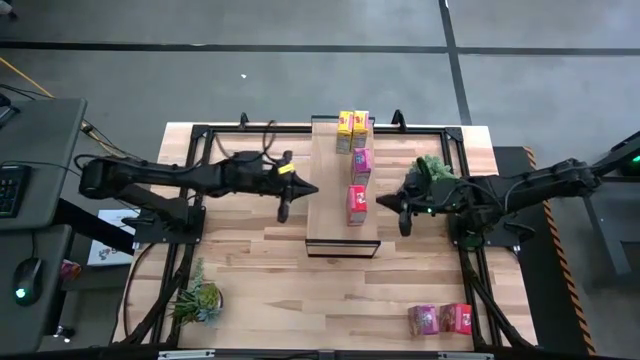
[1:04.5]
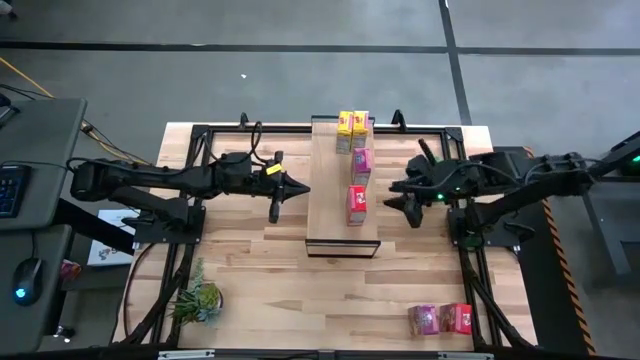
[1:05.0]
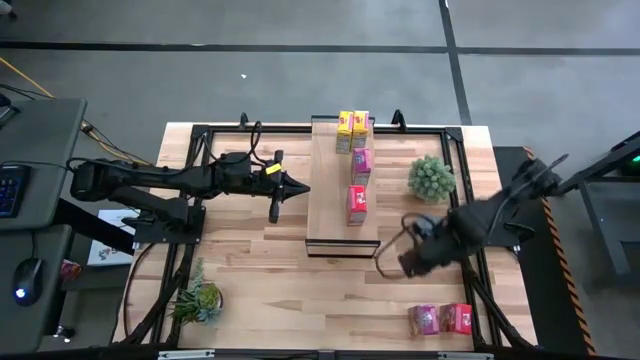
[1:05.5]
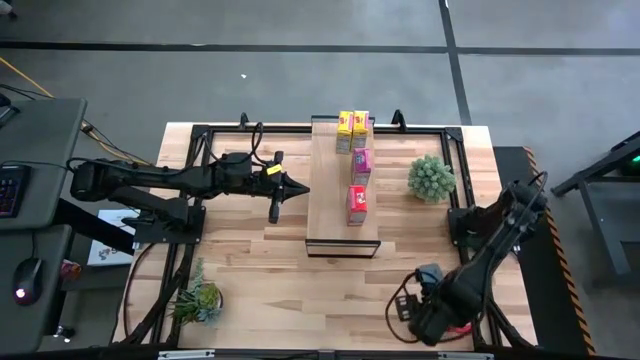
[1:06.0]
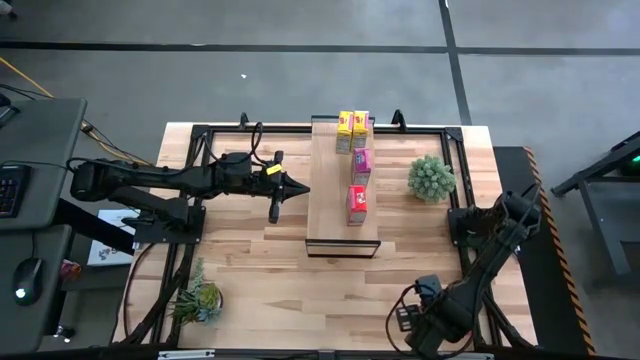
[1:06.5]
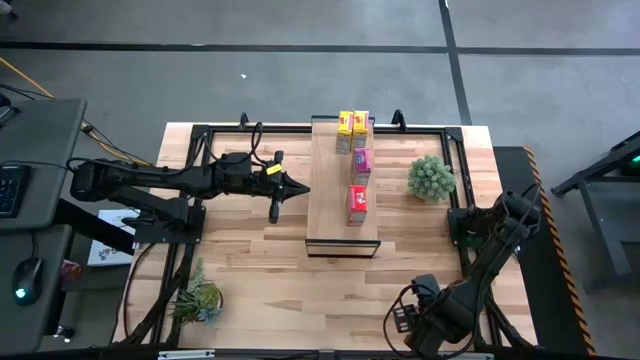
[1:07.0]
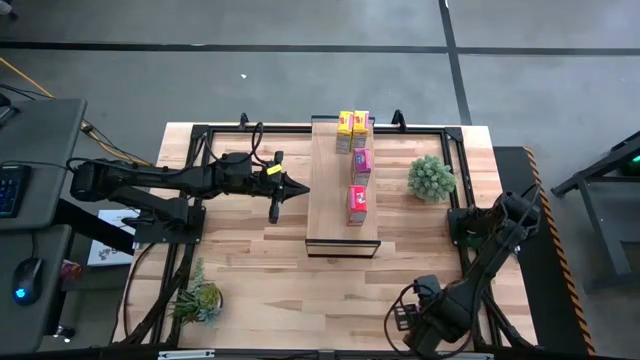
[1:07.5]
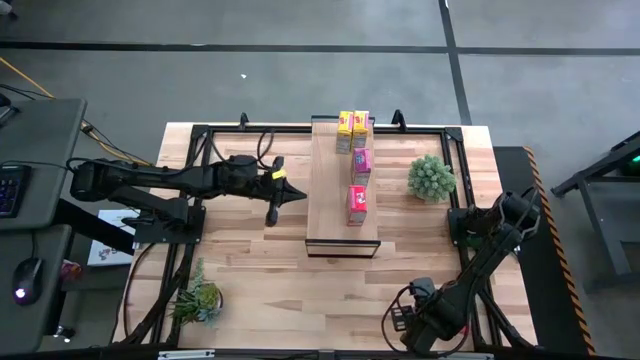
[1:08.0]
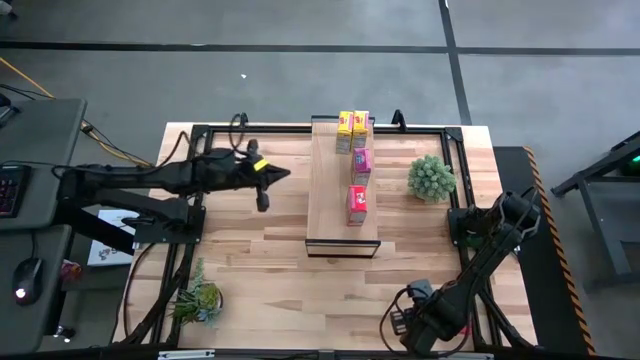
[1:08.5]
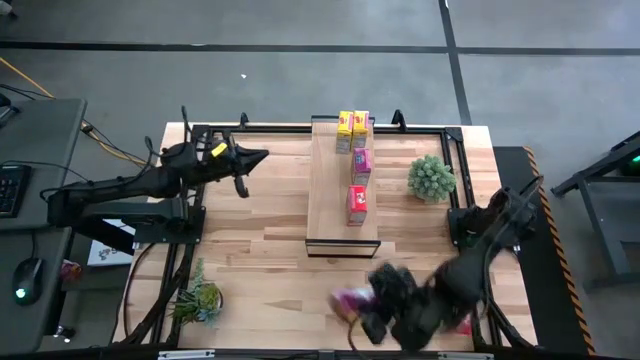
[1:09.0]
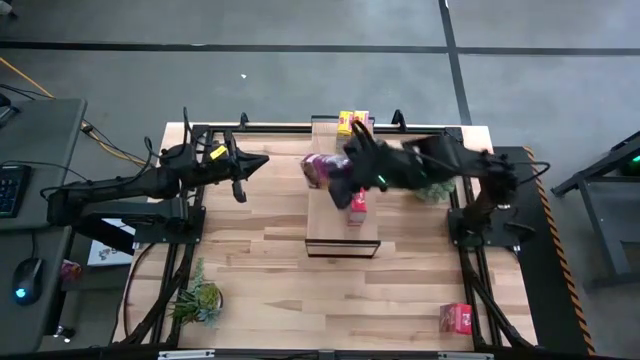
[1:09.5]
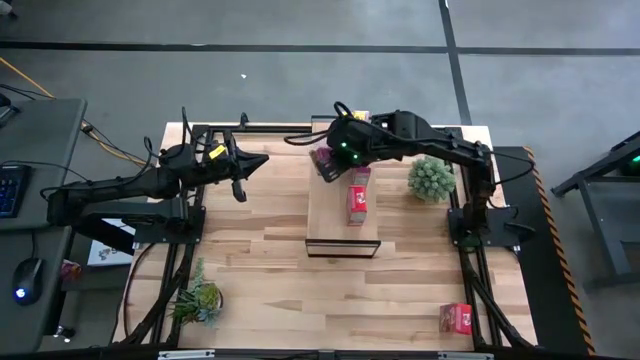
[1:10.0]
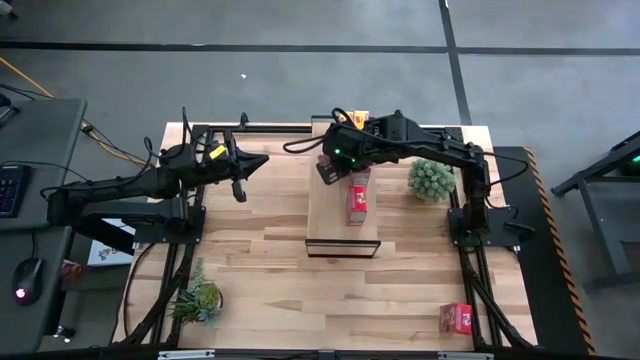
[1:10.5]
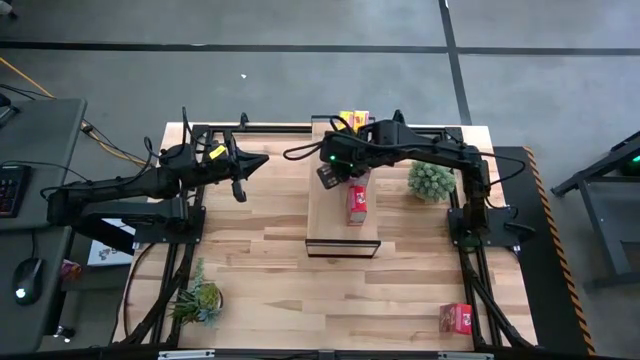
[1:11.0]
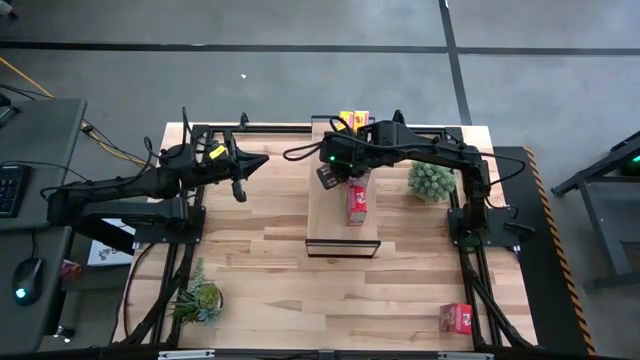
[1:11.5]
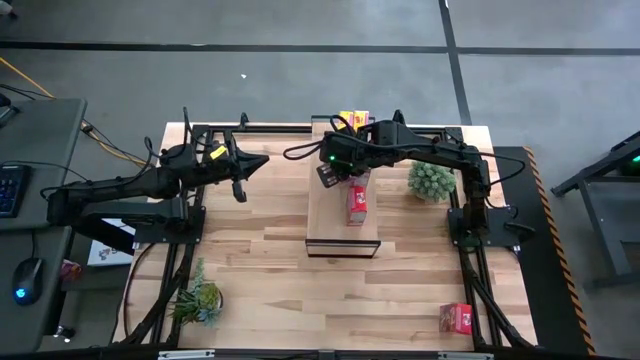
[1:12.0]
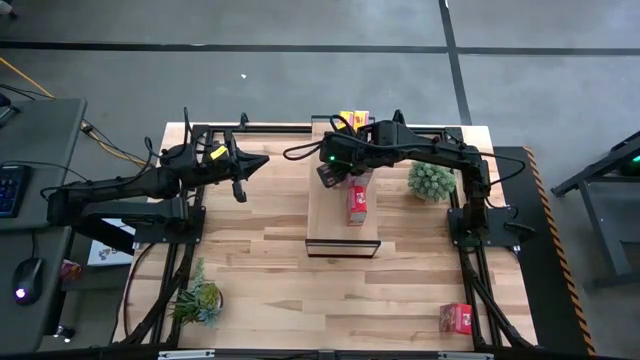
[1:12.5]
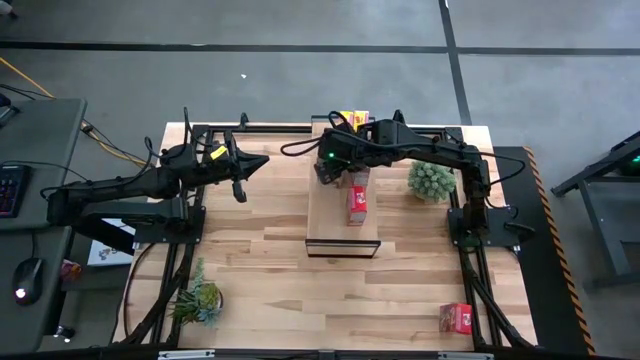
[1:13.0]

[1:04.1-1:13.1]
Task: Stack cereal on shelf
Put the pink cereal box on the shelf

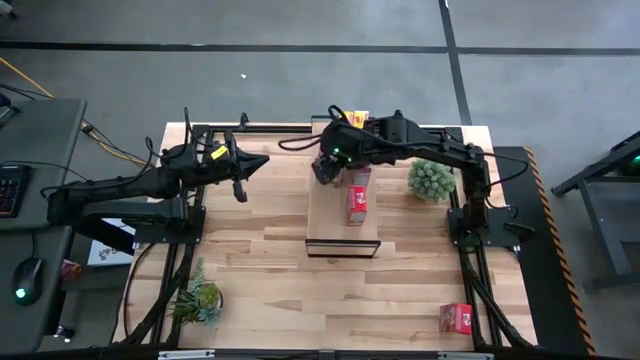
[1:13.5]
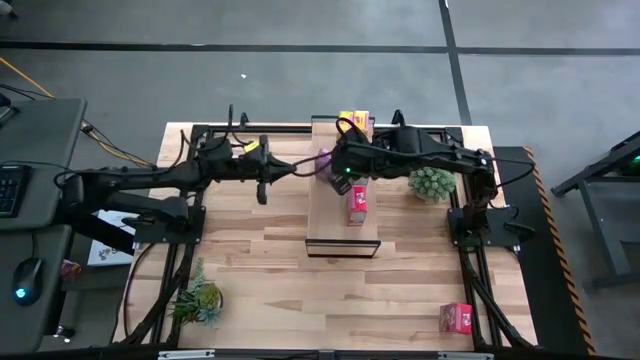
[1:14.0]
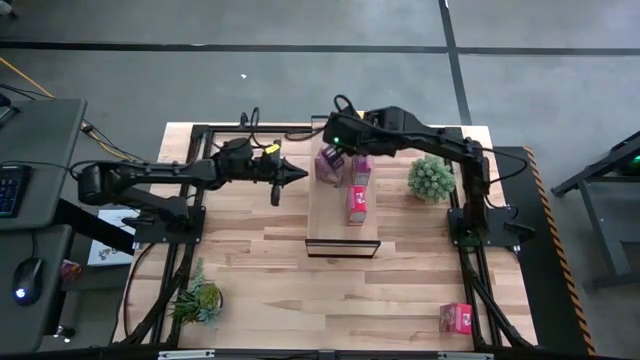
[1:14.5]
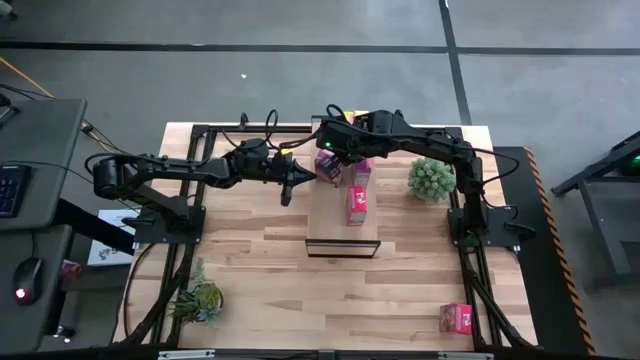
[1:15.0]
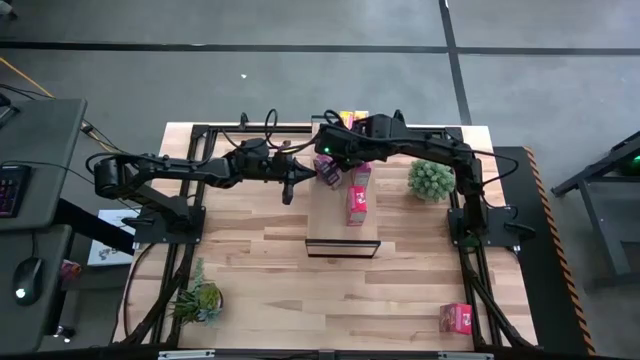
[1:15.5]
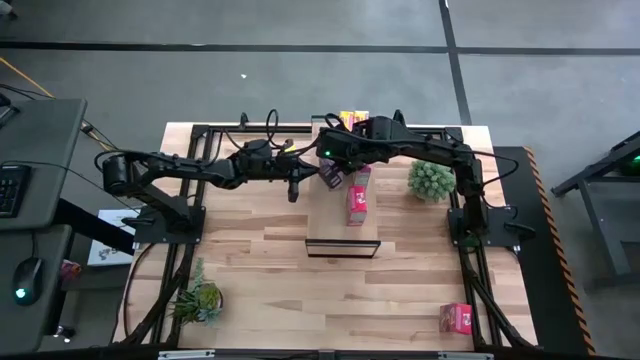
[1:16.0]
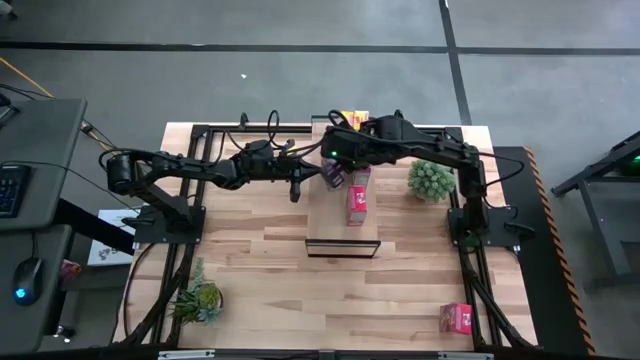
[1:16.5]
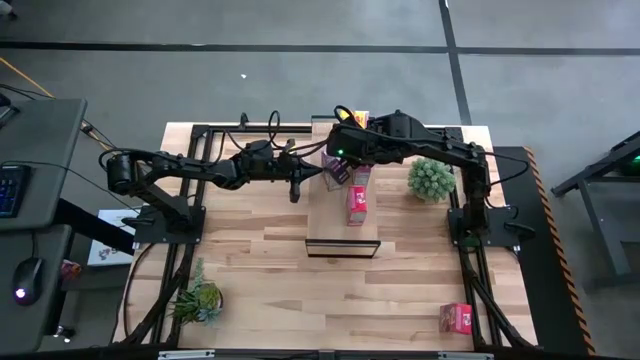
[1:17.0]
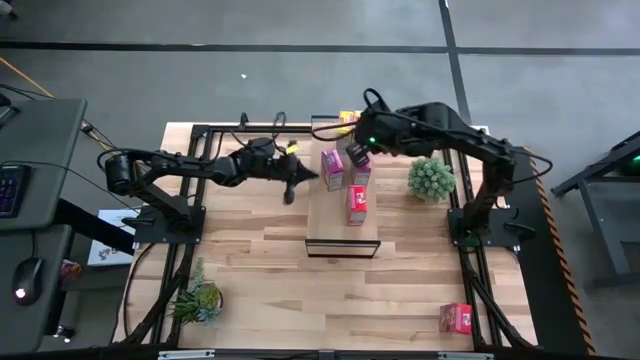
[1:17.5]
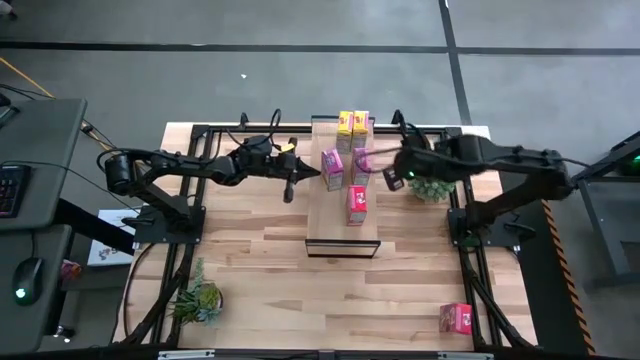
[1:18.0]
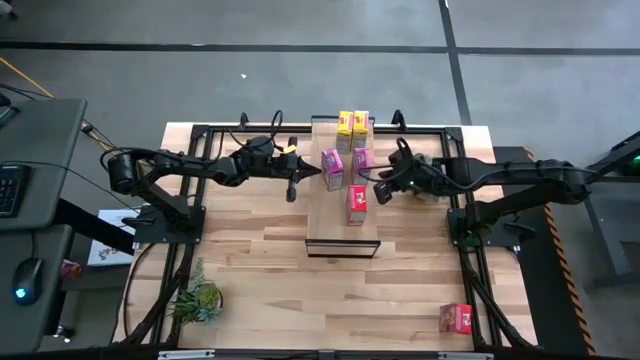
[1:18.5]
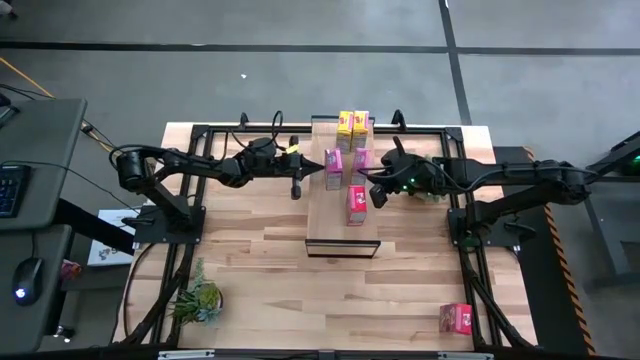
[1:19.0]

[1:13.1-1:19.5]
Adjust the pink cereal box on the shelf

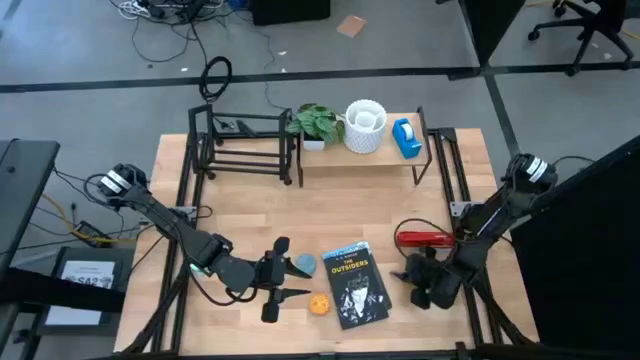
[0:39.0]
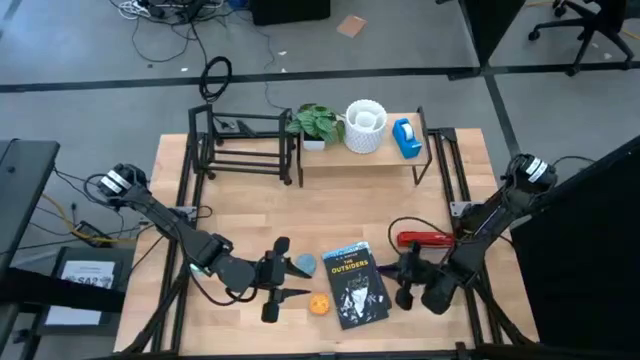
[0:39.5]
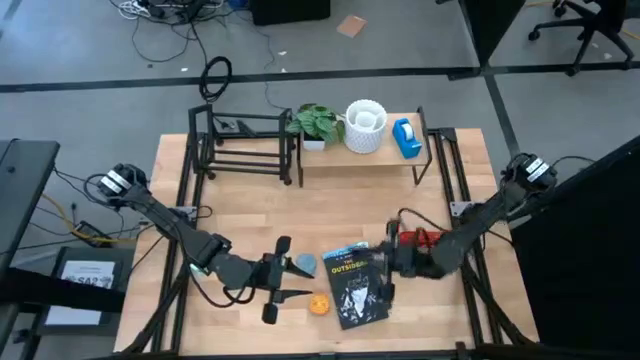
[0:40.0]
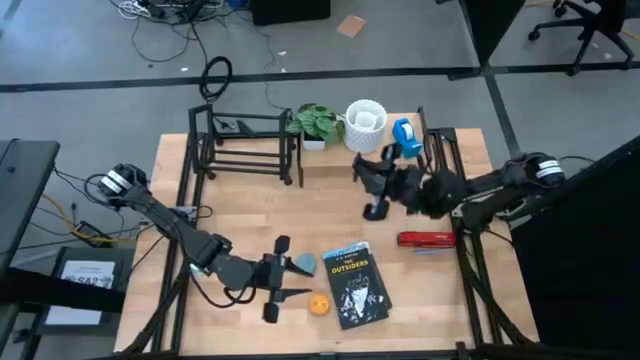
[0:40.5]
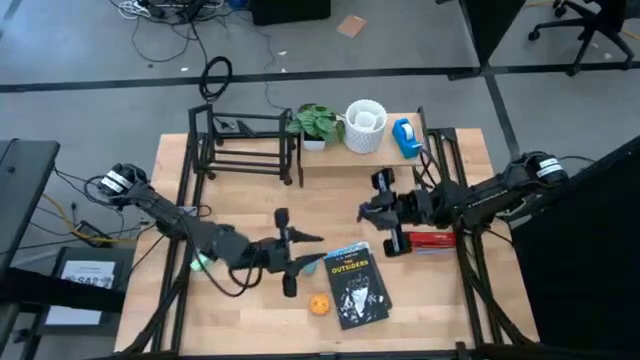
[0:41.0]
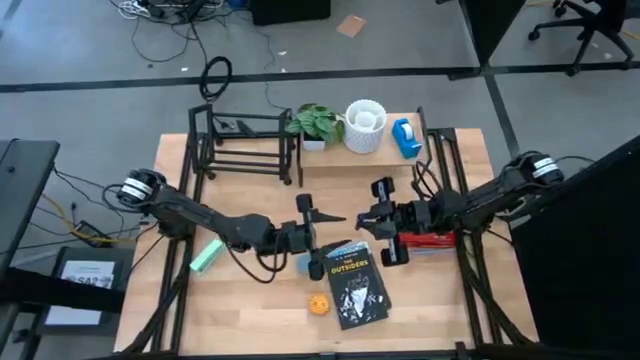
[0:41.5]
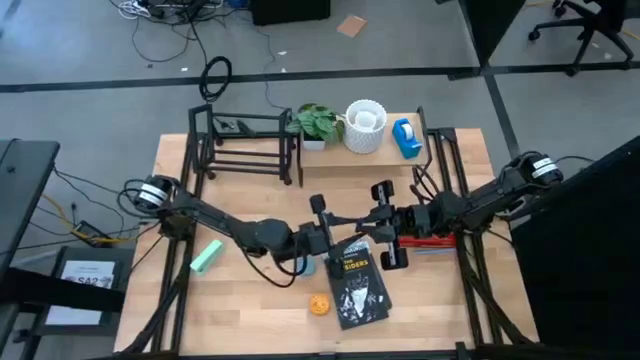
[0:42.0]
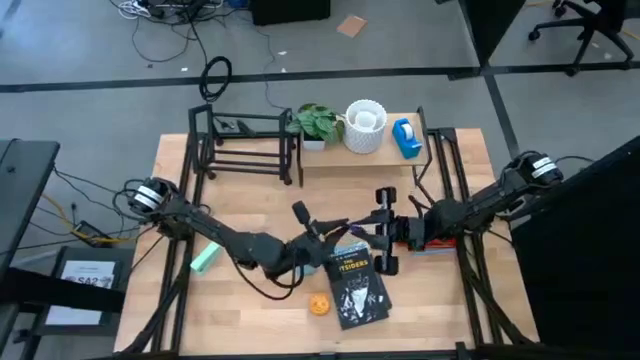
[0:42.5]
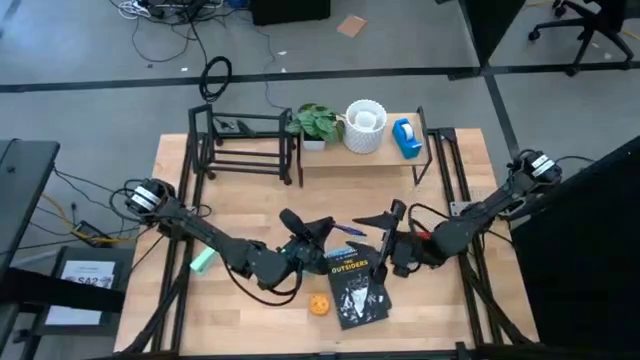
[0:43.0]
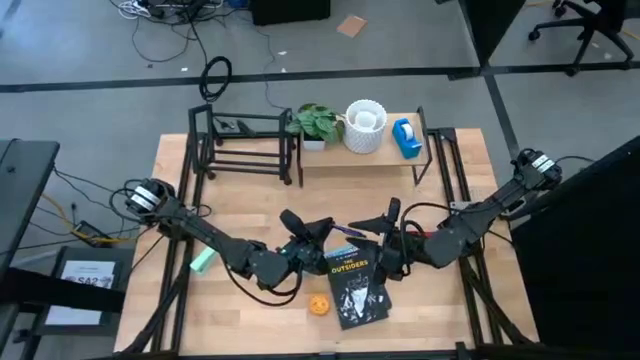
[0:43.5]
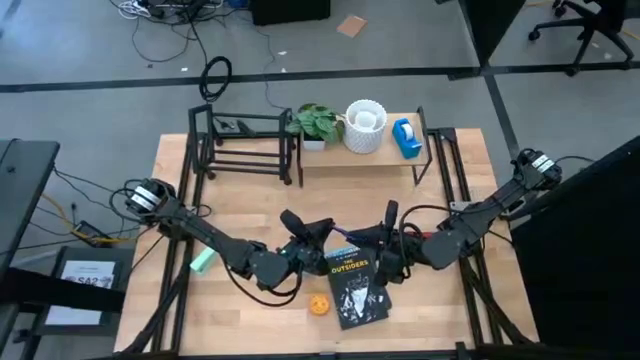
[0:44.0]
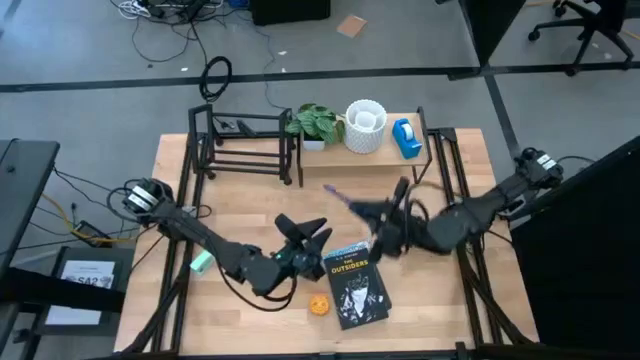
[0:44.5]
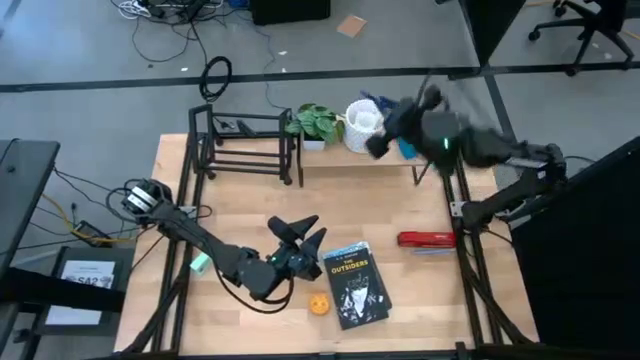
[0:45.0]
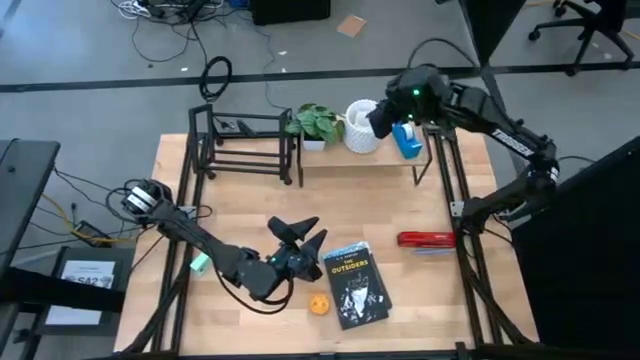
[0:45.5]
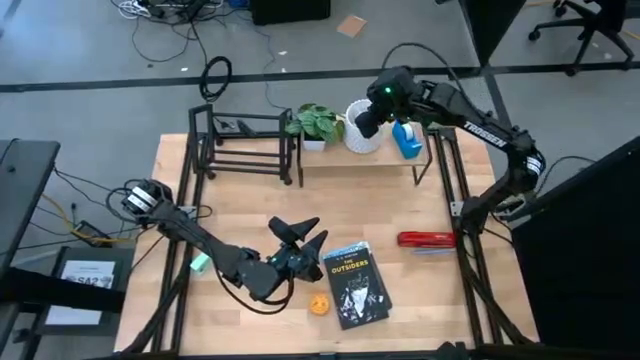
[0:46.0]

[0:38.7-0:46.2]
Task: Stock shelves
Put the blue pen into the white pen organizer on the shelf
